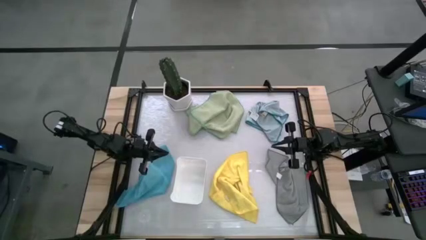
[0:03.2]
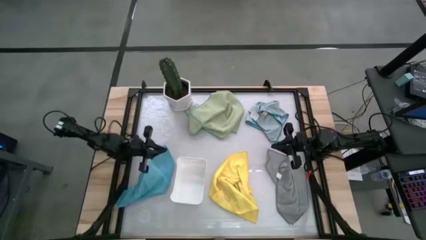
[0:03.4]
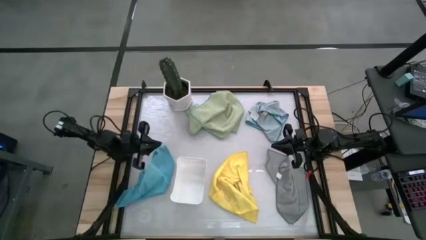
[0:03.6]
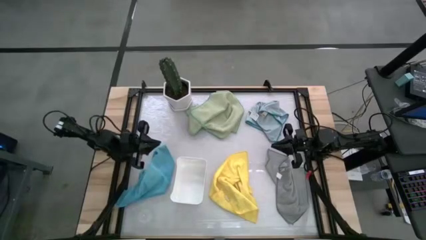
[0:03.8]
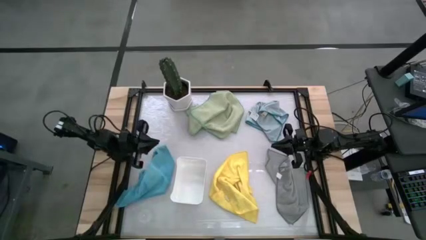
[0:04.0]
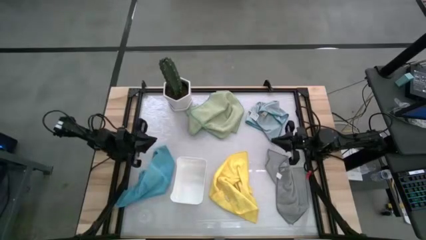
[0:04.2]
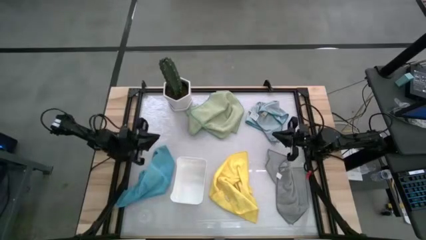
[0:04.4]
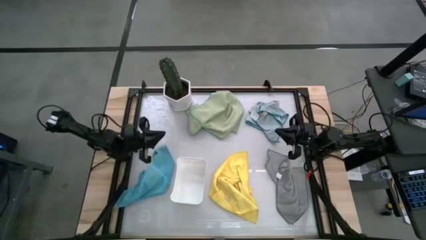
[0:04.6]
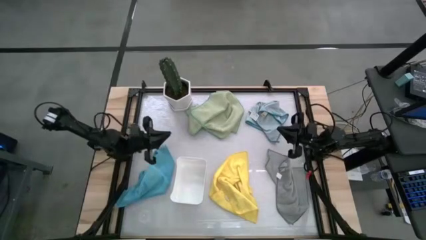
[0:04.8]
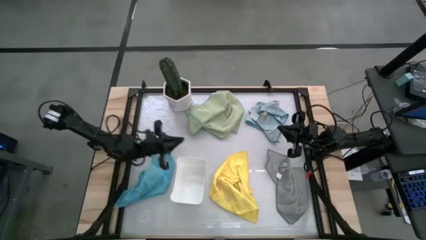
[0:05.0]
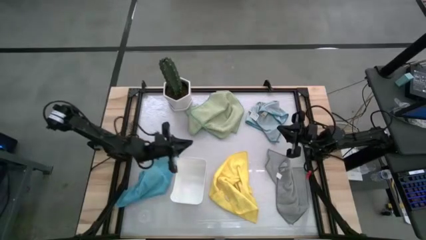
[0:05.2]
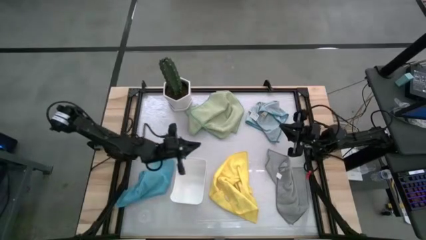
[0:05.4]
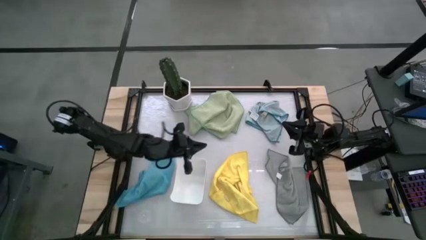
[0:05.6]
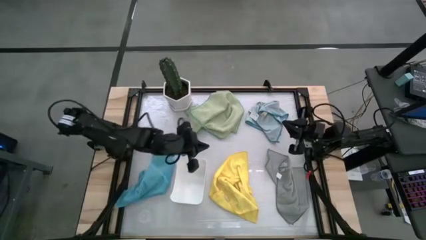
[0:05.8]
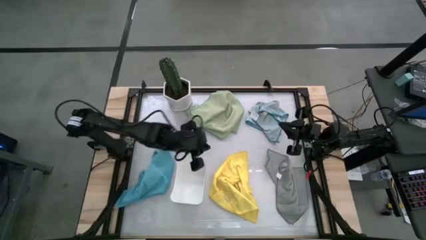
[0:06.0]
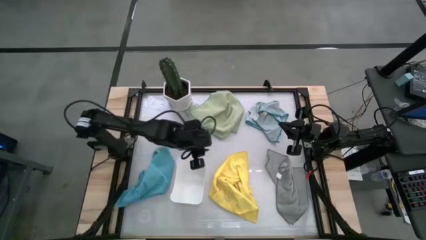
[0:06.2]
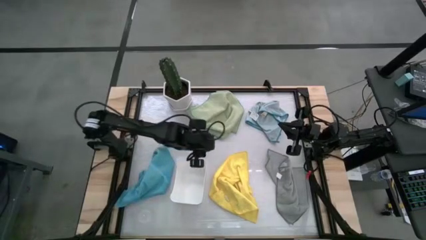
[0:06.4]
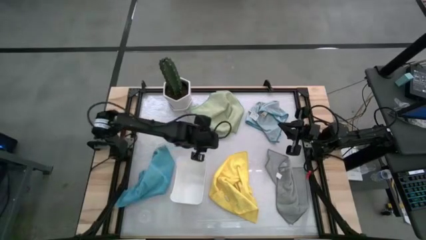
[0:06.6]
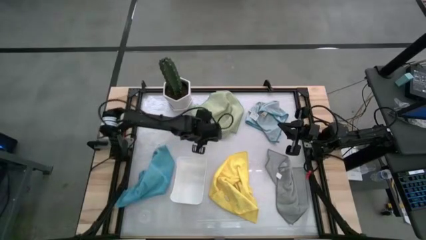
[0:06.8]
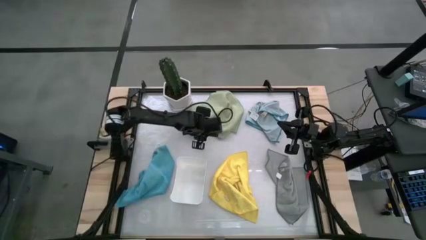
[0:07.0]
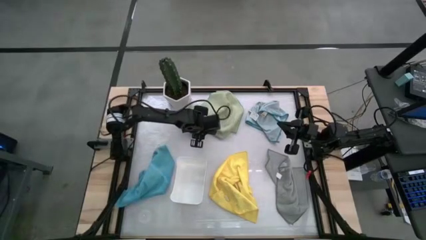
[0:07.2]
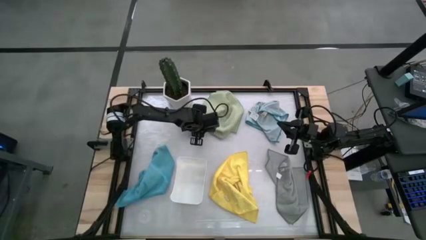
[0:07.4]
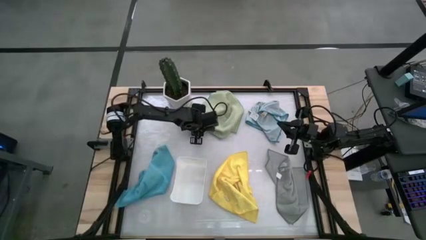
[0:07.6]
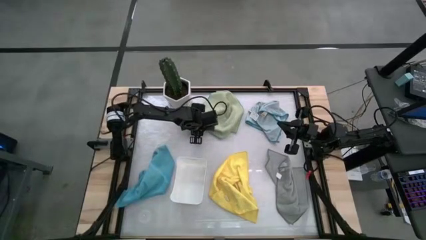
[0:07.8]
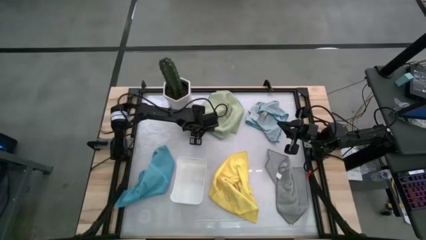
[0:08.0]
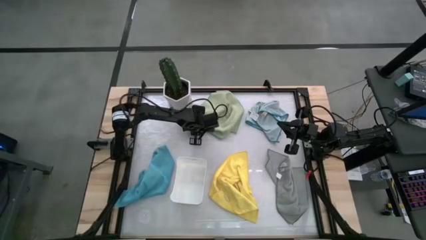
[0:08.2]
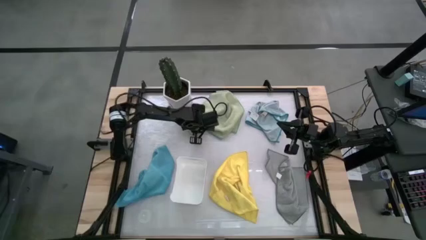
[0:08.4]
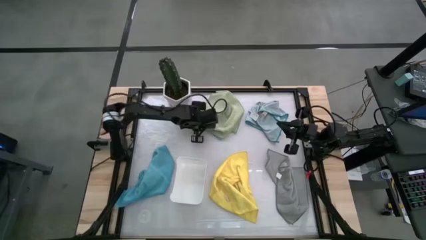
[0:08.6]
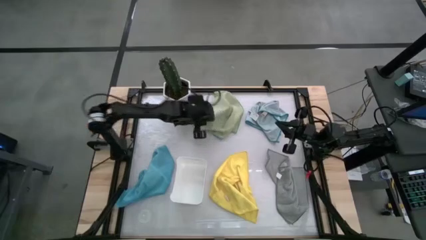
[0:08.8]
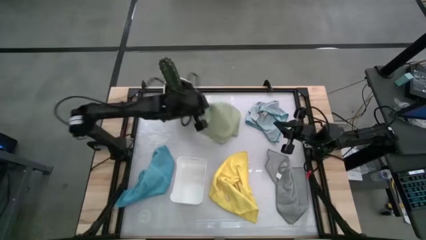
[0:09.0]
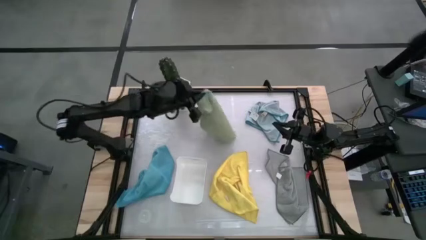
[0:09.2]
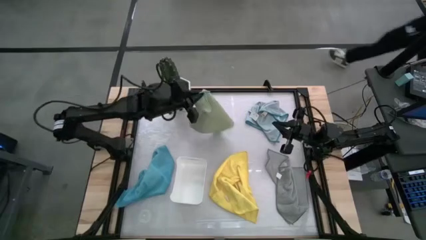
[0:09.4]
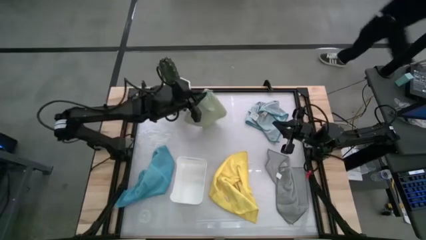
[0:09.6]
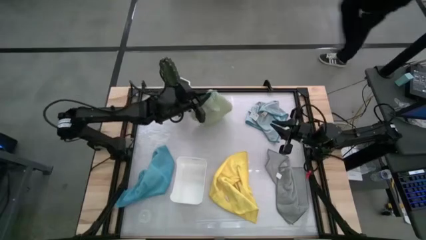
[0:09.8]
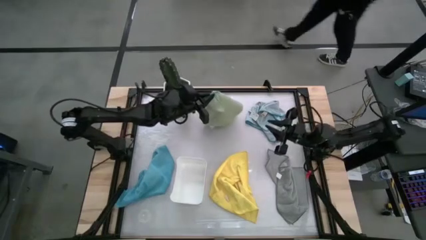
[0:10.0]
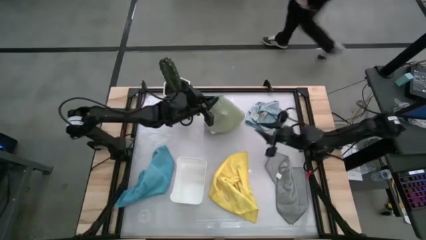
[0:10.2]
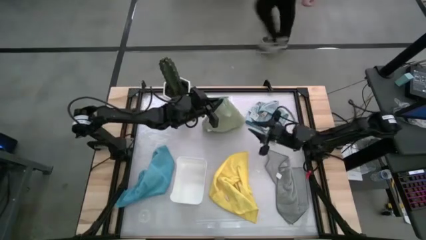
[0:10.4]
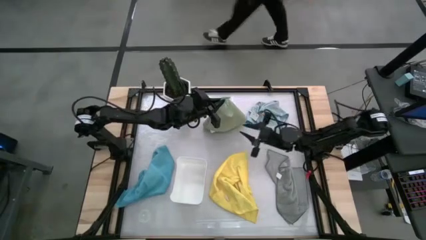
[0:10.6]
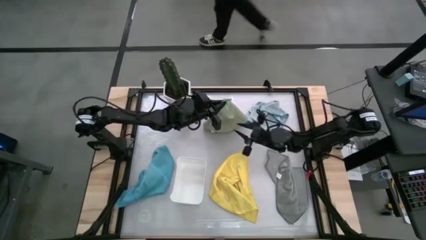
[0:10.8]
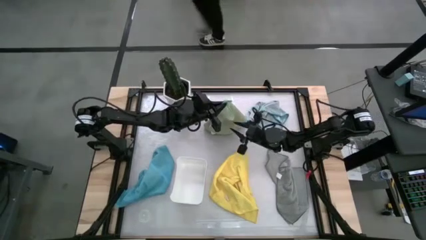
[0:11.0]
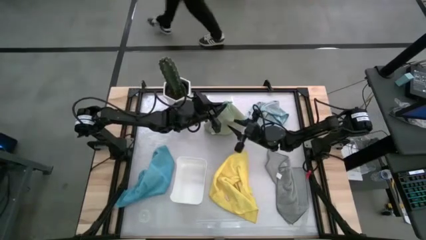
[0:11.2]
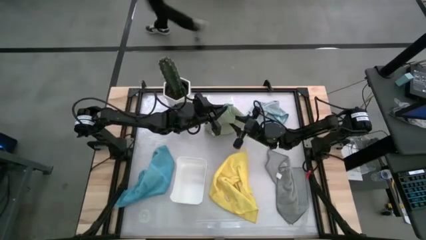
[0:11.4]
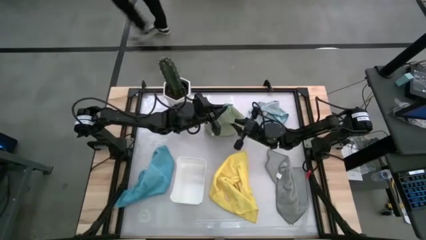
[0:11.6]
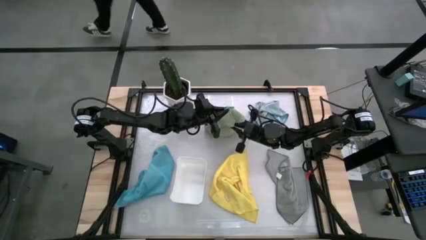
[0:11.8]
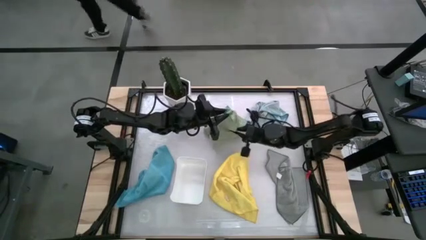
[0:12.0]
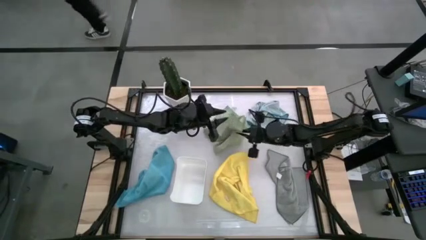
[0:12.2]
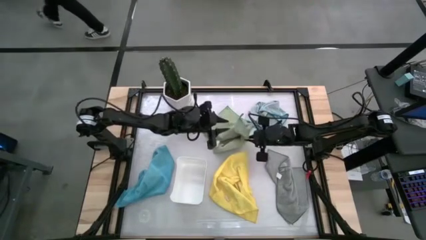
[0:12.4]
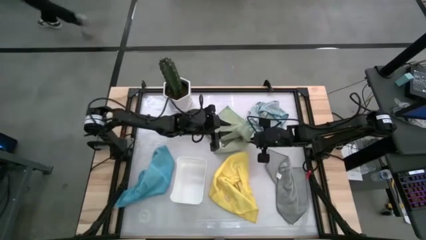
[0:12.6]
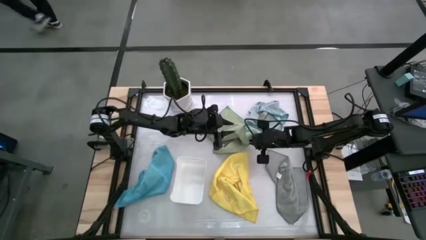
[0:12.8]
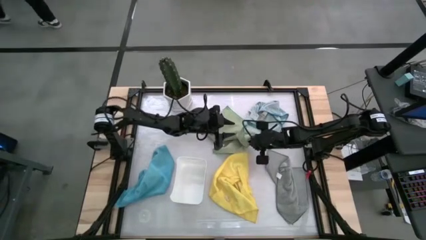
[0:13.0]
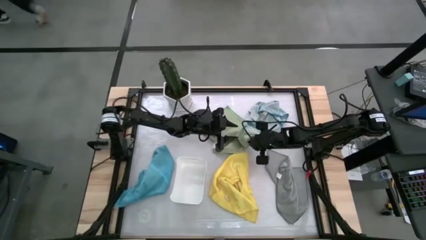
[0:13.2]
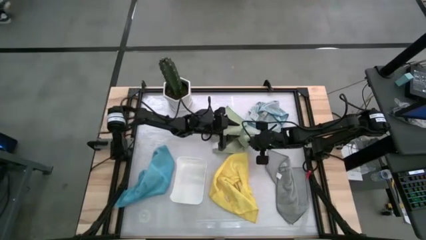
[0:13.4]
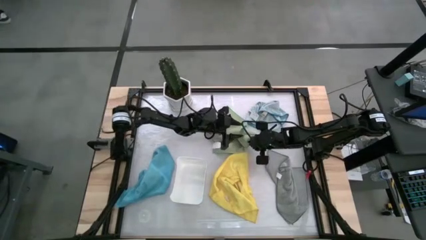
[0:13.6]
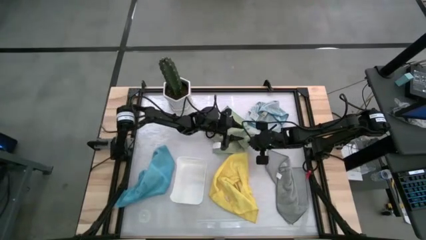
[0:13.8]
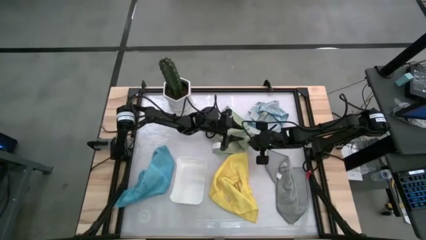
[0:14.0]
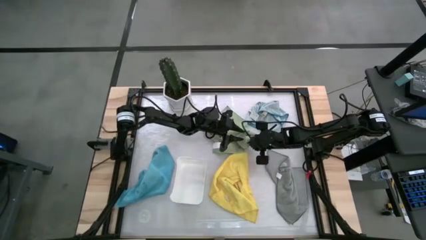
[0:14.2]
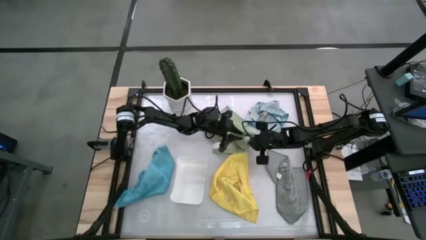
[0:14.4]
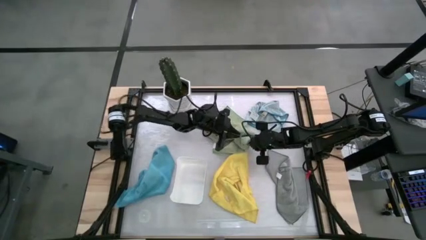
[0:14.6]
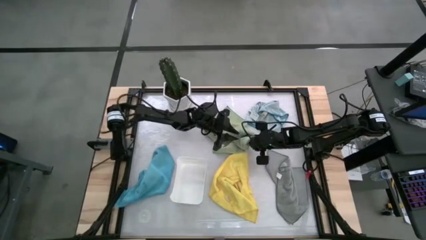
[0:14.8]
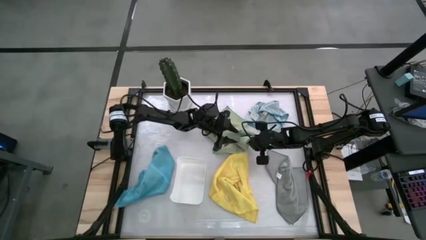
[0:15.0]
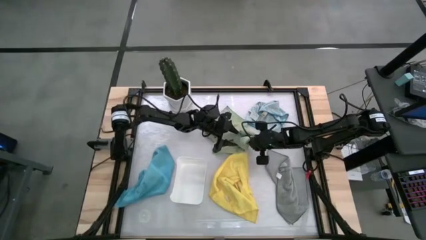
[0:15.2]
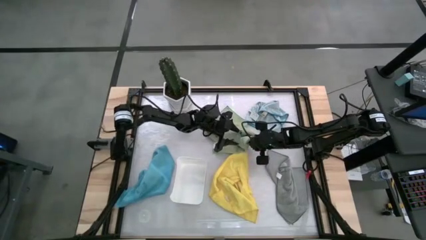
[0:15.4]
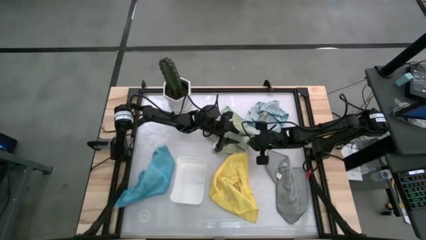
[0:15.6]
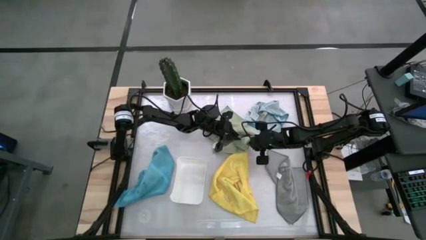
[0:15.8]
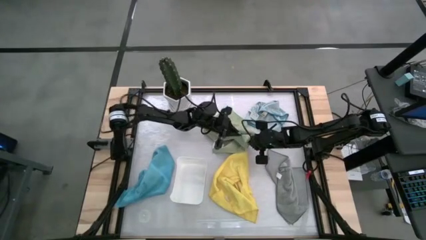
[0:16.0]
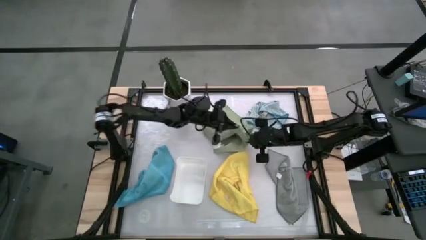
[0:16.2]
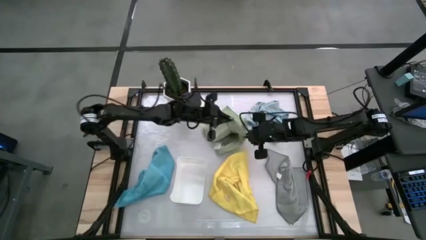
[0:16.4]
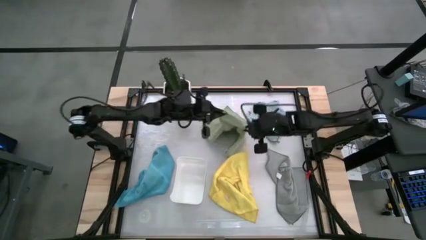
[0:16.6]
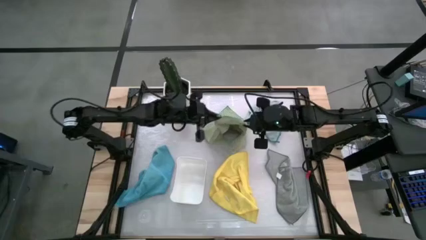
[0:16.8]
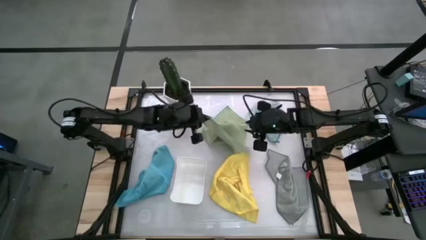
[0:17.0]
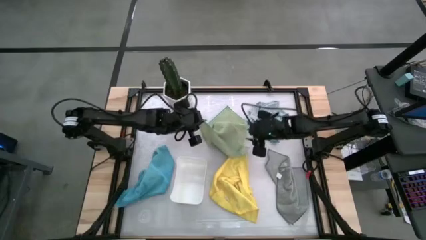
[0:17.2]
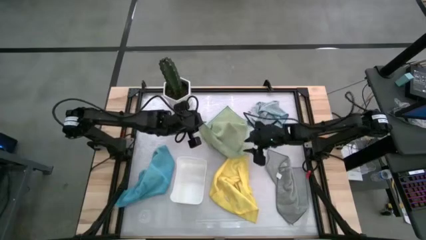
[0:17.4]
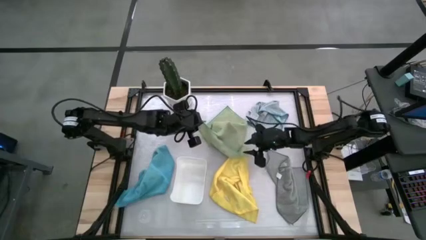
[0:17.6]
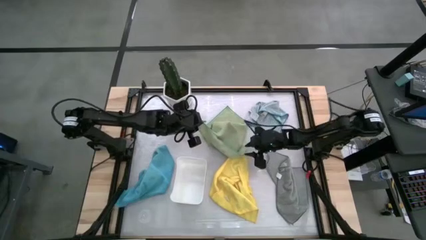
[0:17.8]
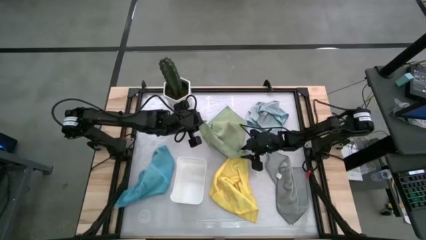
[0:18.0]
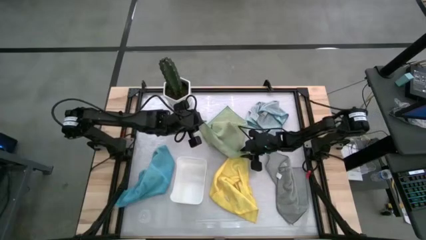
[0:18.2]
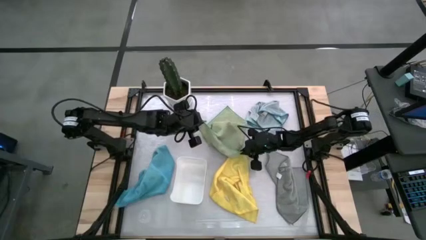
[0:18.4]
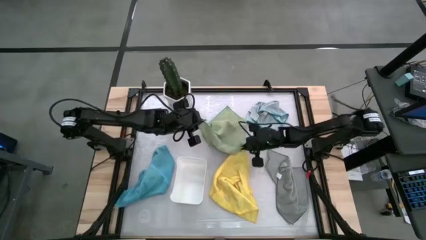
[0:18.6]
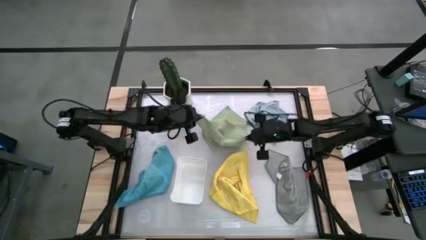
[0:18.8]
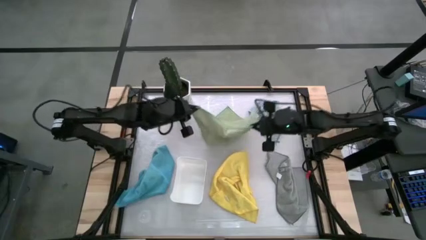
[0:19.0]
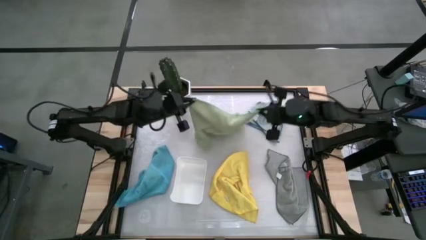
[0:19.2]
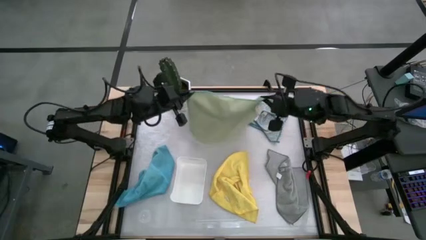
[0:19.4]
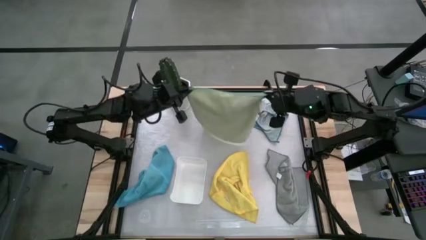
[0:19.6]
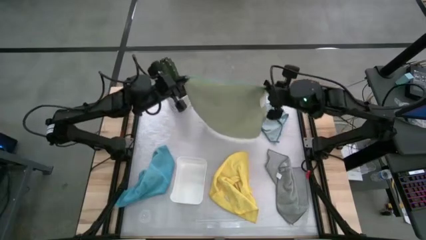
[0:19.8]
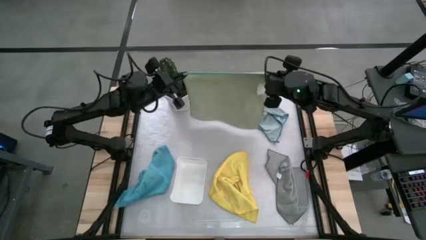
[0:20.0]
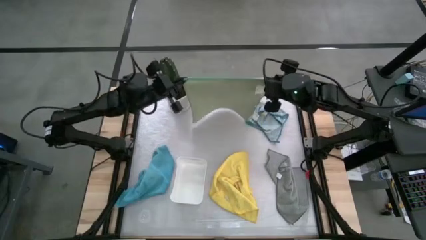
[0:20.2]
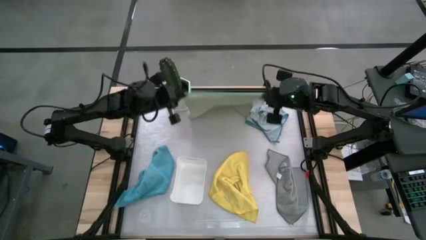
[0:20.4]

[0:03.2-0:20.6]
Task: Fold microfiber towels
Fold the green microfiber towel
